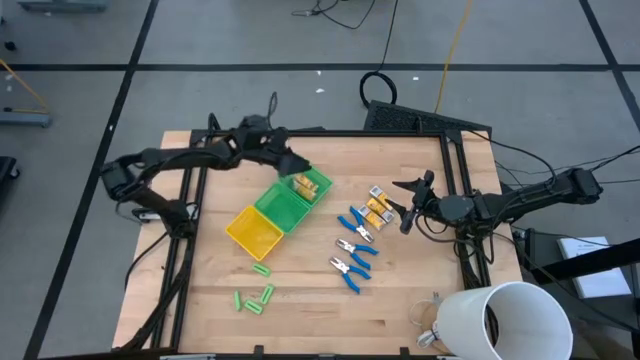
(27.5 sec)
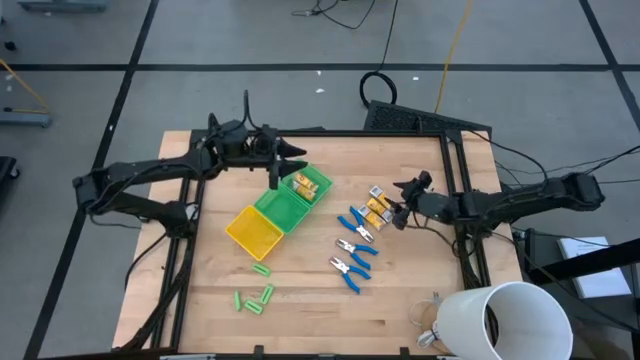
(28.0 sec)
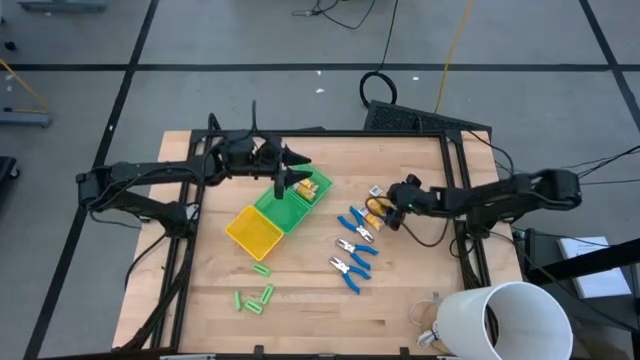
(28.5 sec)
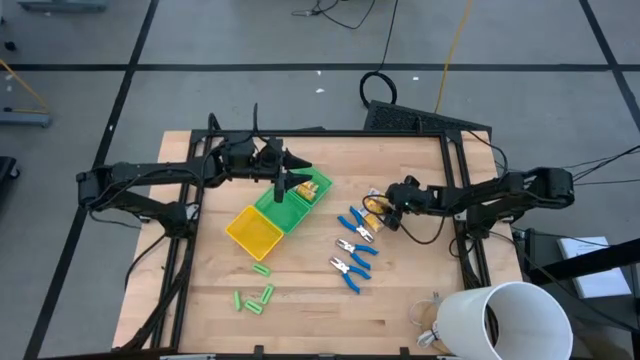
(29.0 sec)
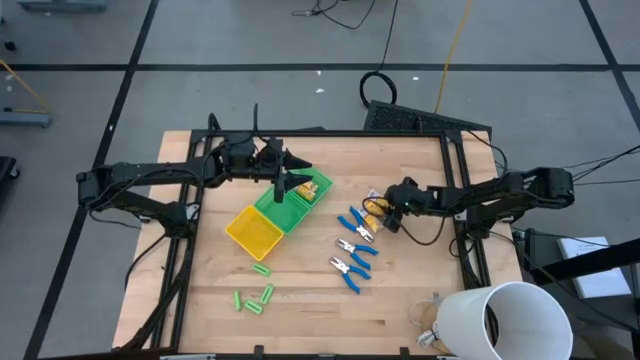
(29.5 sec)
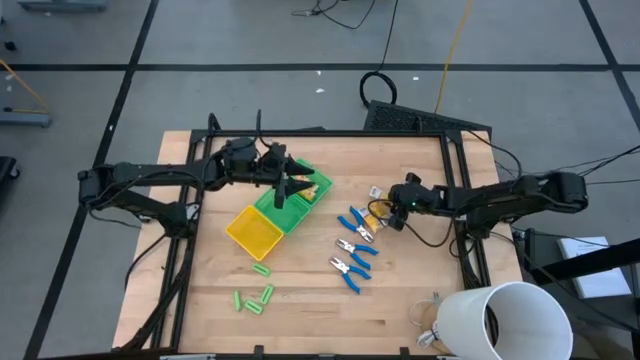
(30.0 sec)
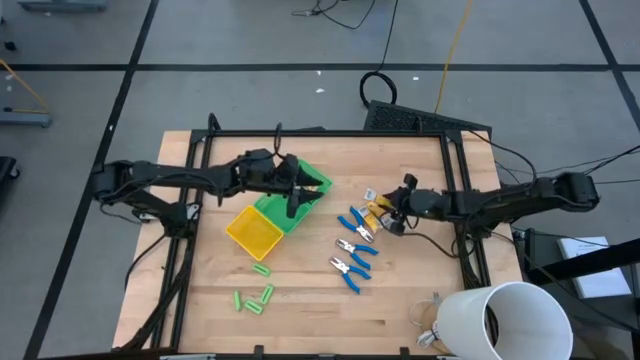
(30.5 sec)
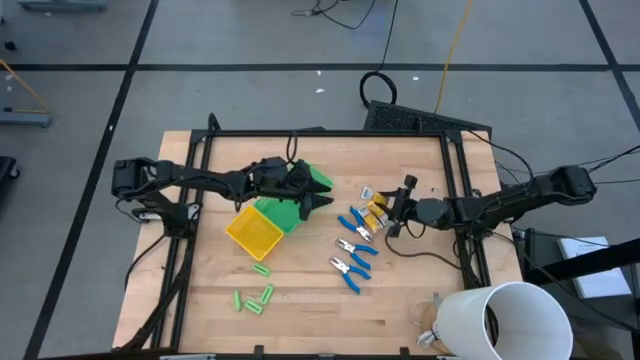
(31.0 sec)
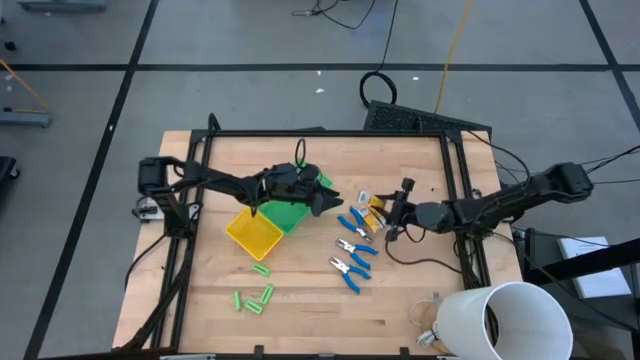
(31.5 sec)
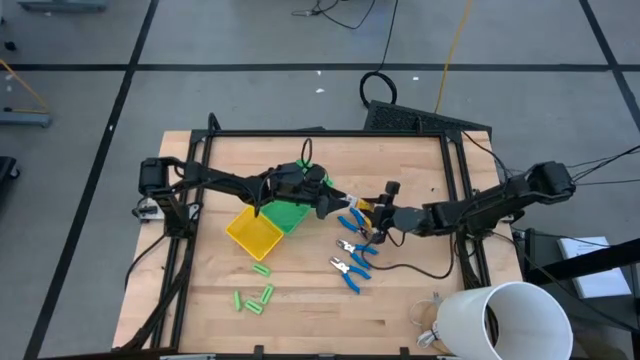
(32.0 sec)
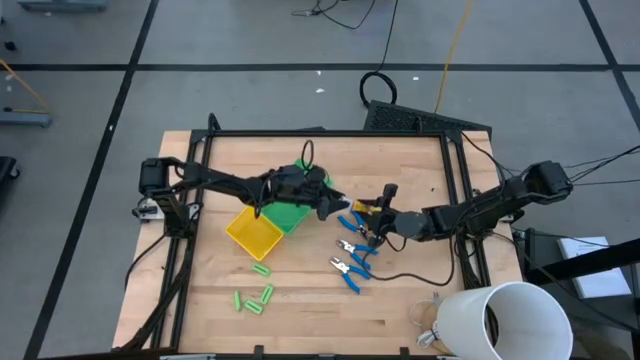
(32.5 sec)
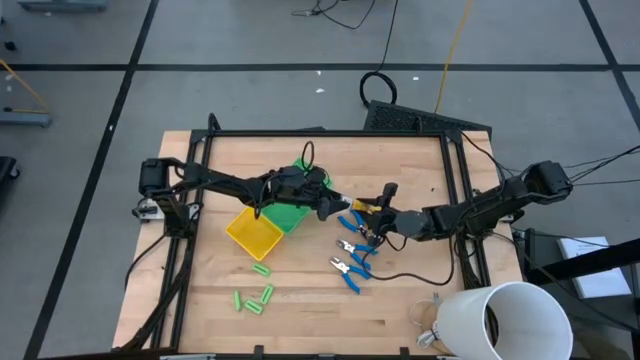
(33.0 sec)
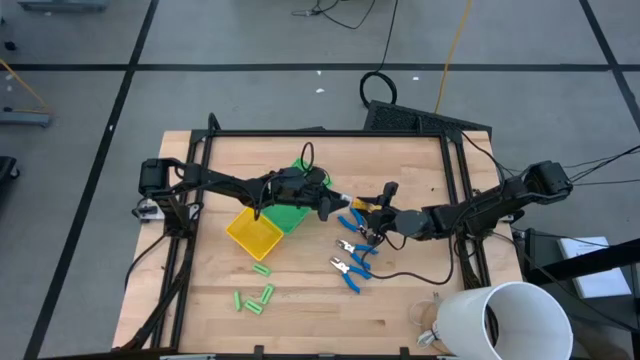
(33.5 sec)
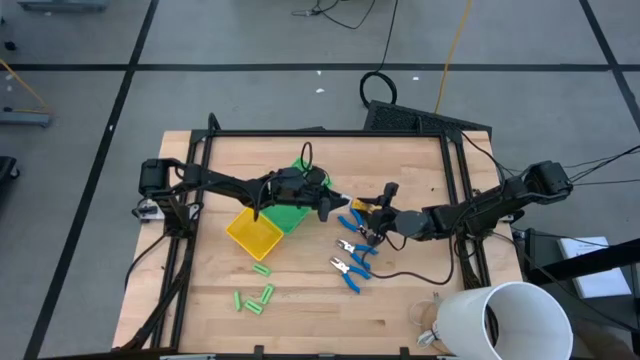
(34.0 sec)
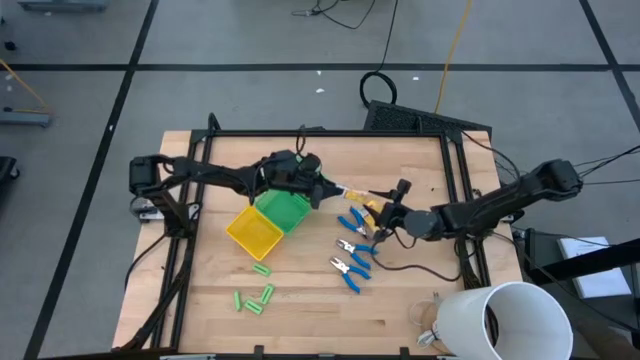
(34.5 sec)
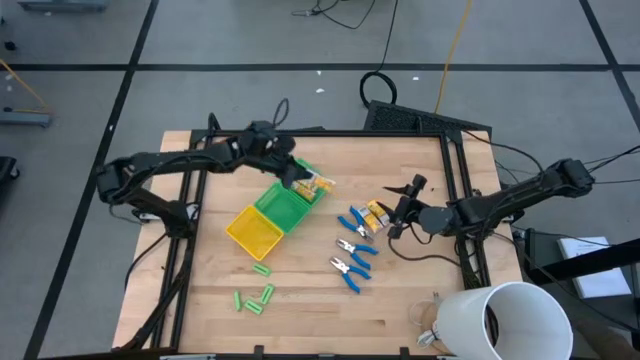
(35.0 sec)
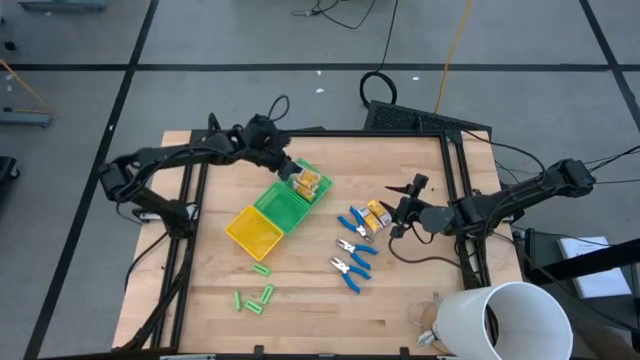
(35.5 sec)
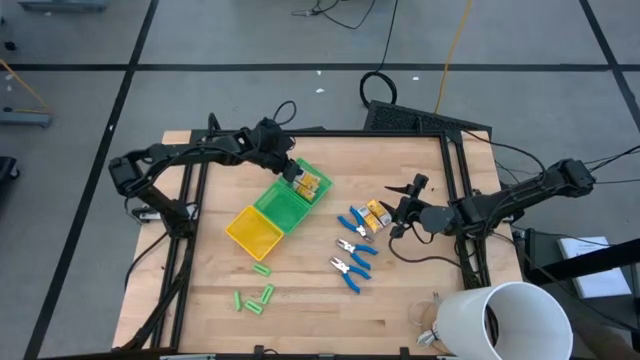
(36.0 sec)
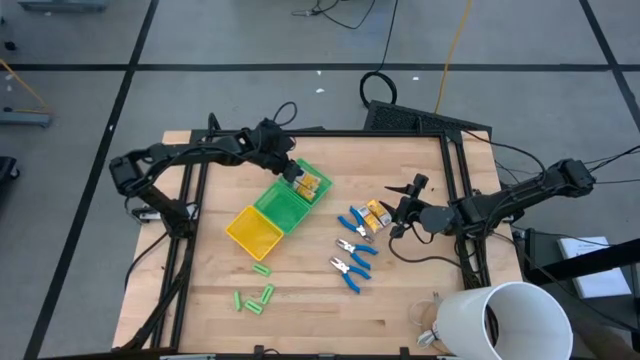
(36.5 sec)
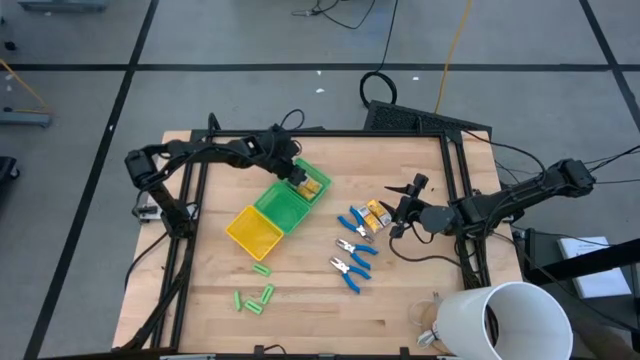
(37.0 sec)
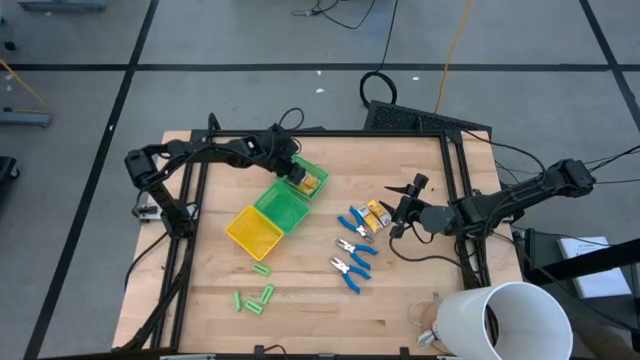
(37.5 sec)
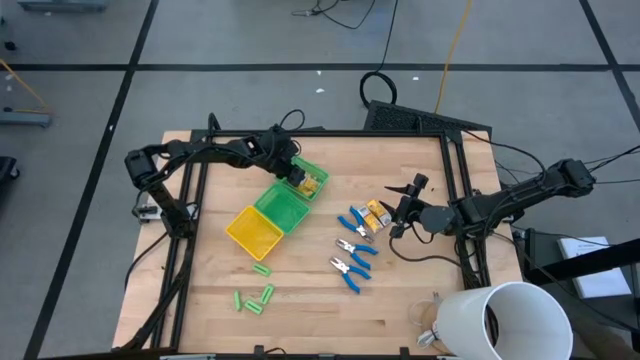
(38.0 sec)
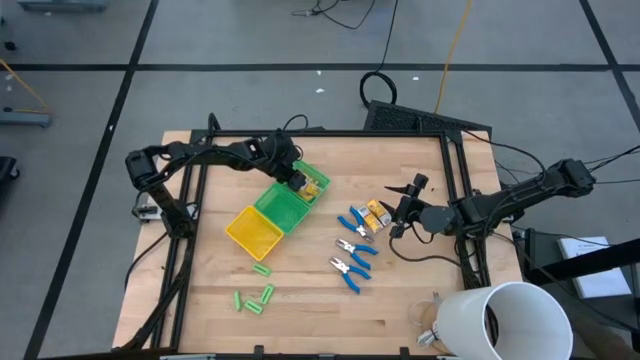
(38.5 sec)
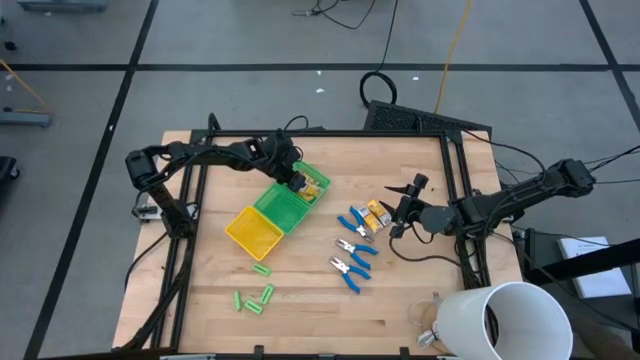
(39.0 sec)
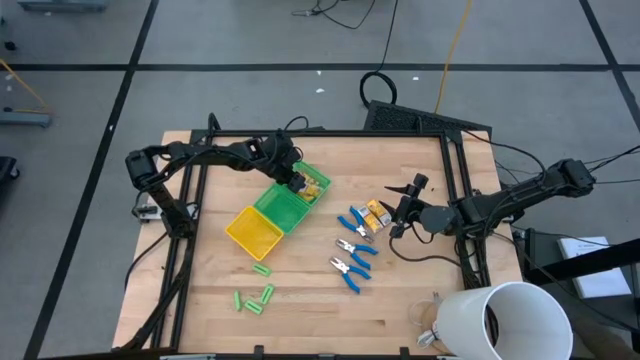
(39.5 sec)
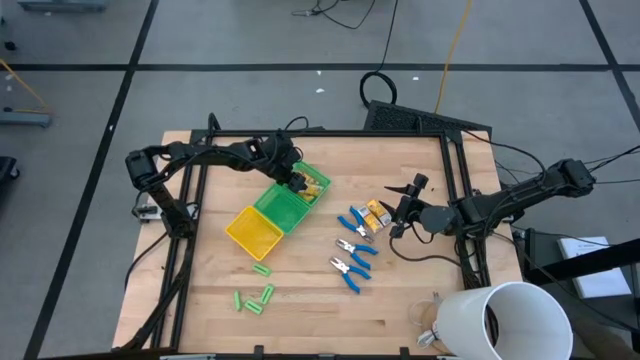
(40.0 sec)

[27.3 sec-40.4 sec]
Task: Pick & Place School Supplies
Put the crayon box into the top green bin

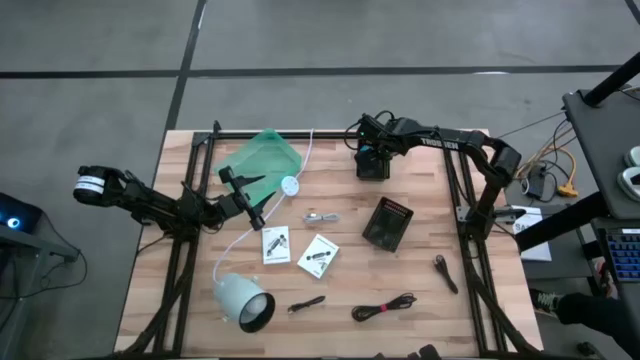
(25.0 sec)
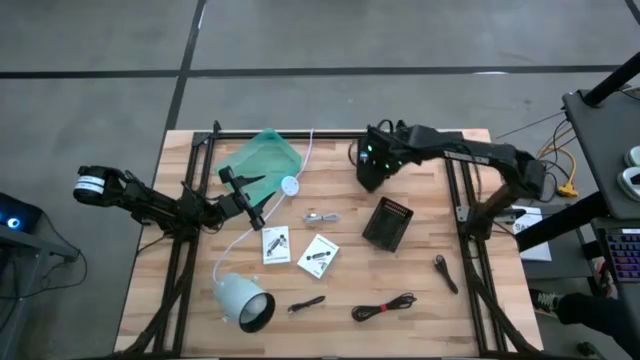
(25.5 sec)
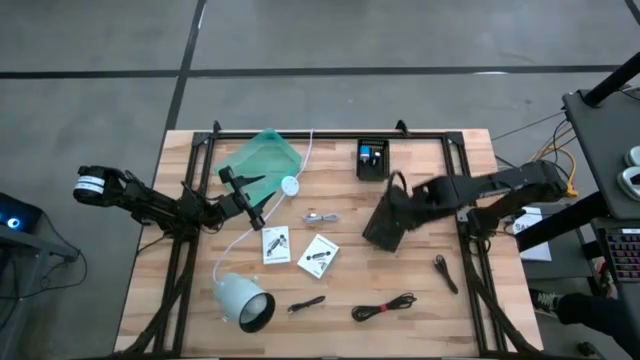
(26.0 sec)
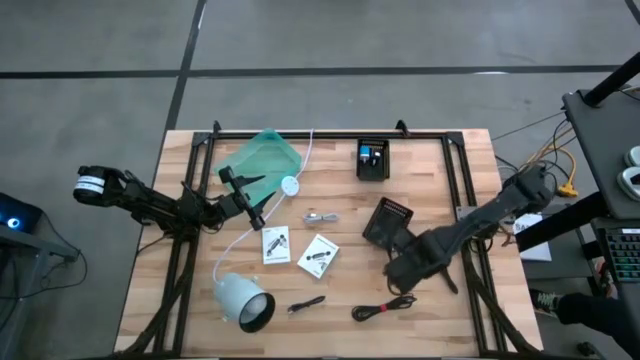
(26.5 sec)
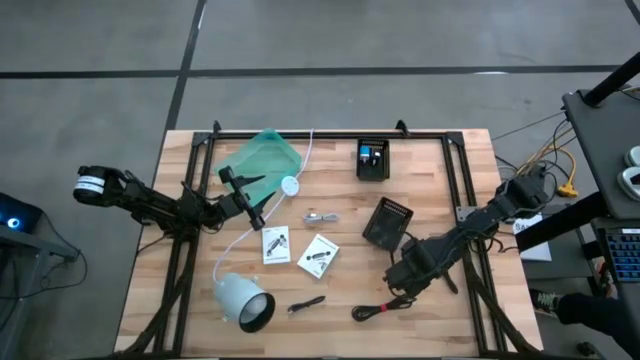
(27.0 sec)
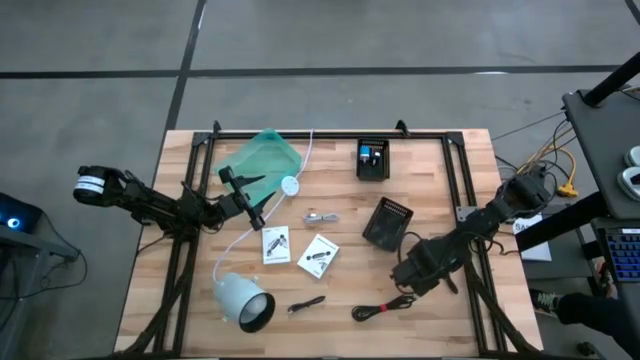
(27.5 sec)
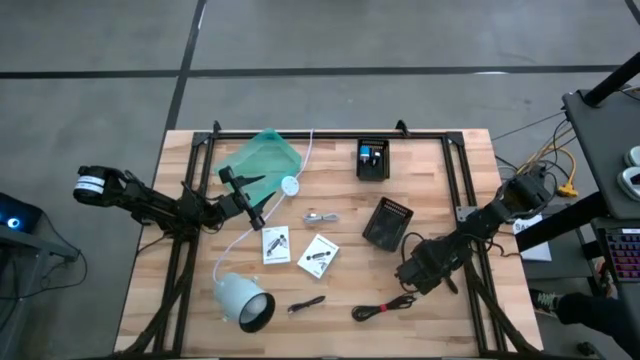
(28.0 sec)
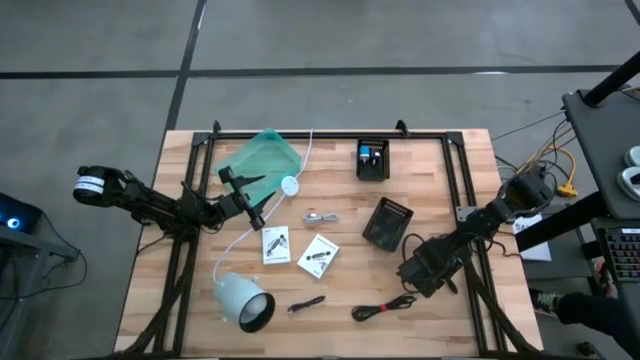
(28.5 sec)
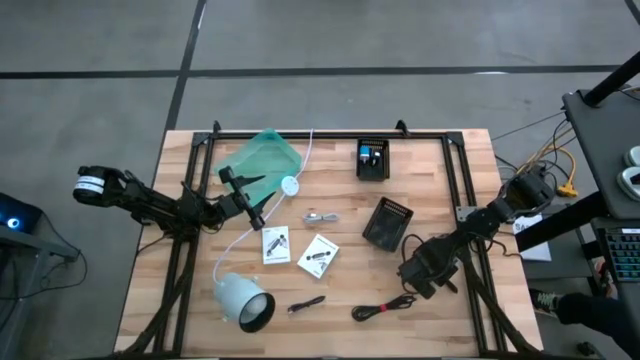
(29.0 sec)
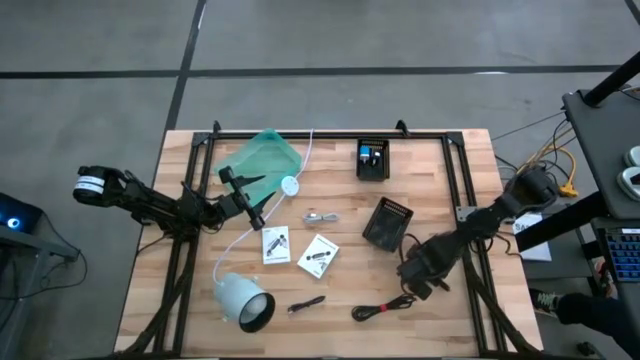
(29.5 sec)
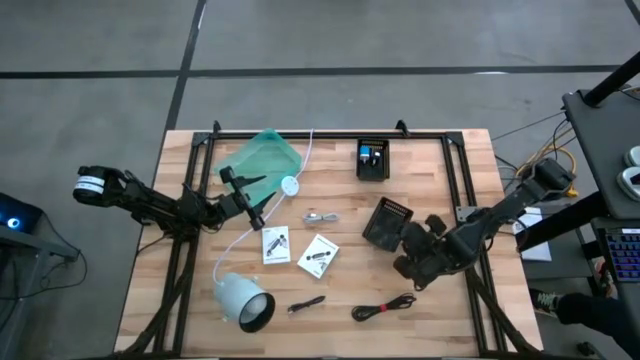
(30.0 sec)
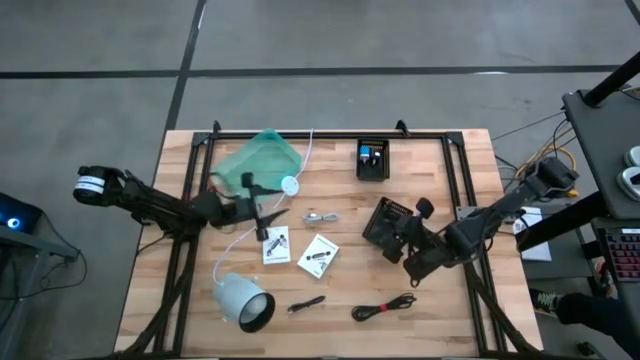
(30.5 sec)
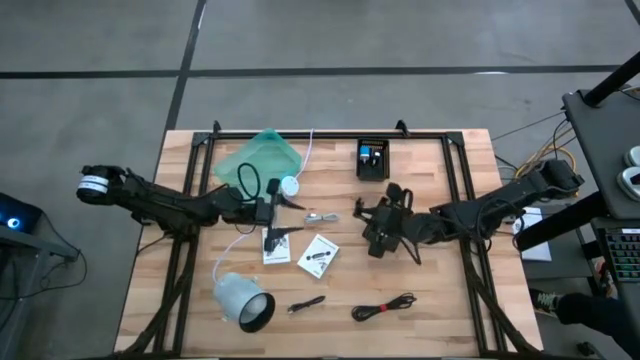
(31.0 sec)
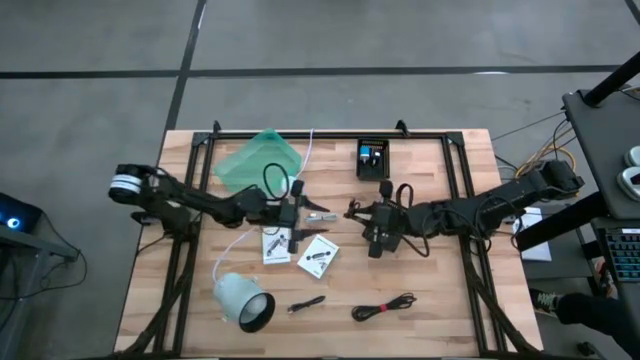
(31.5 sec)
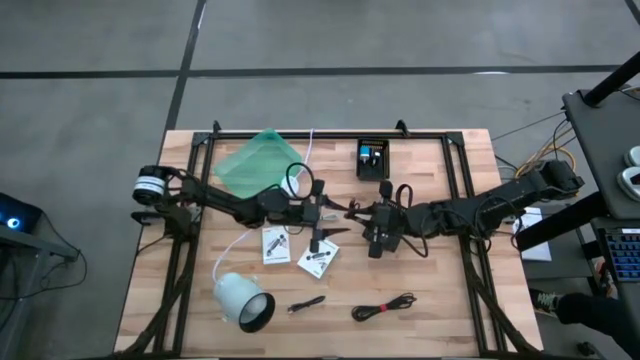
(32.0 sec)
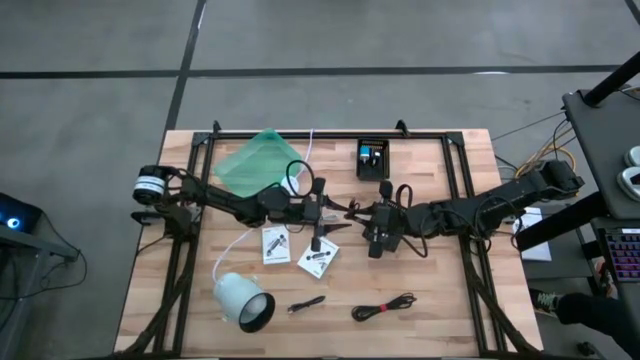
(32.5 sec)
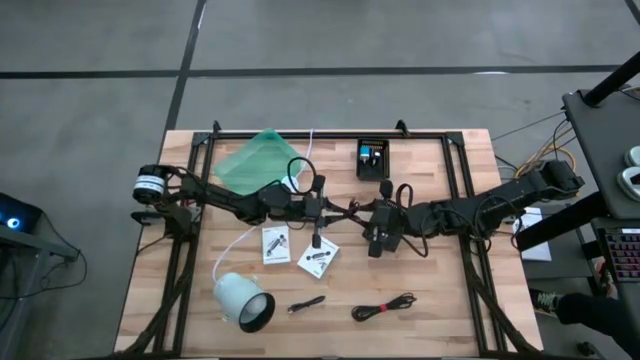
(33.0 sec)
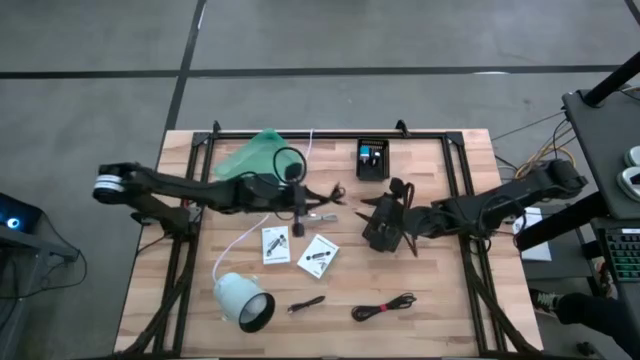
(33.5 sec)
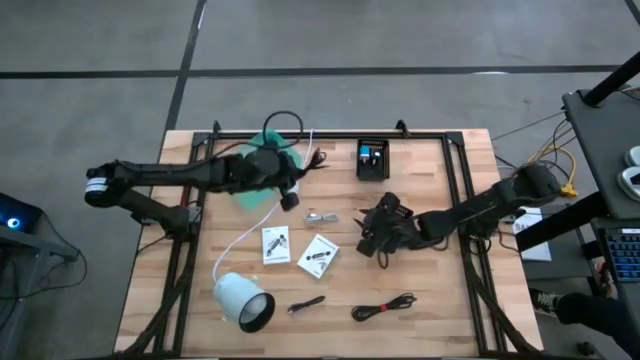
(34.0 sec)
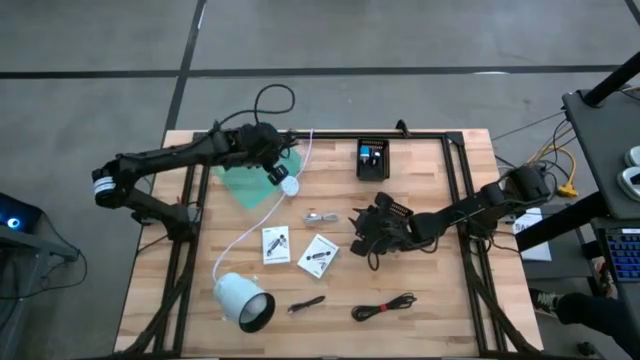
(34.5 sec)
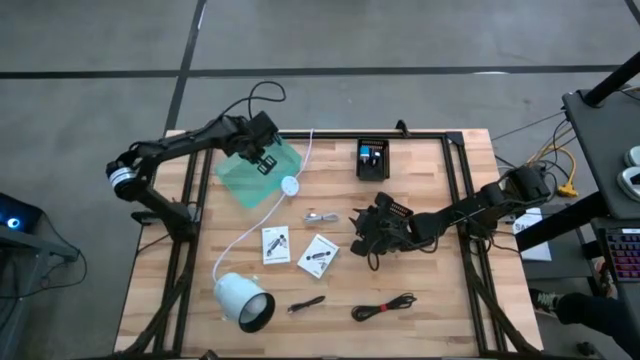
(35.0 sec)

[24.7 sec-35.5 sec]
Task: Pick and place items into bin
Put the top right black charger cable into the green bin
